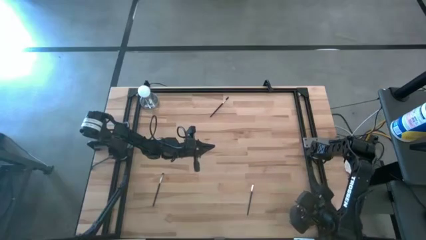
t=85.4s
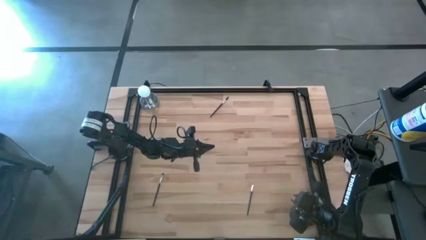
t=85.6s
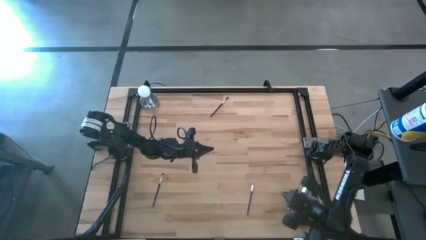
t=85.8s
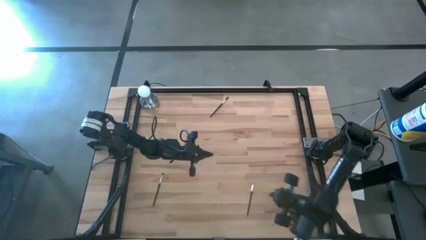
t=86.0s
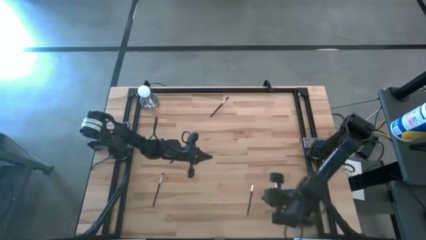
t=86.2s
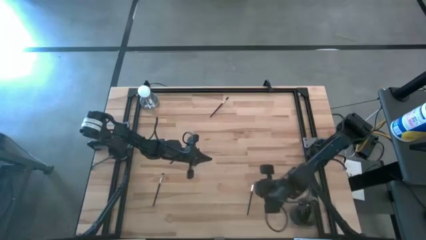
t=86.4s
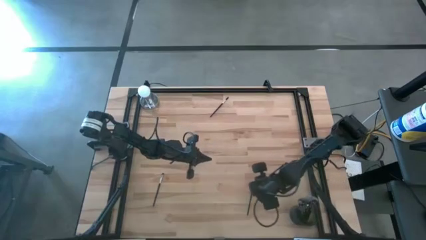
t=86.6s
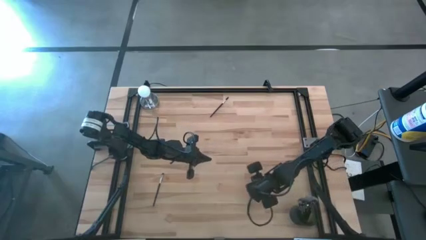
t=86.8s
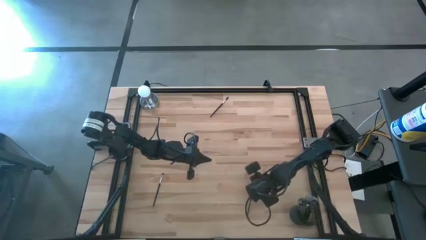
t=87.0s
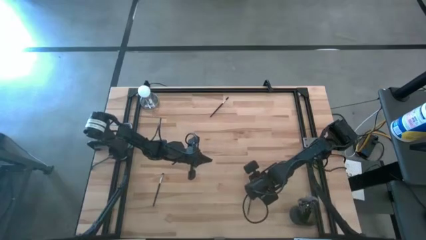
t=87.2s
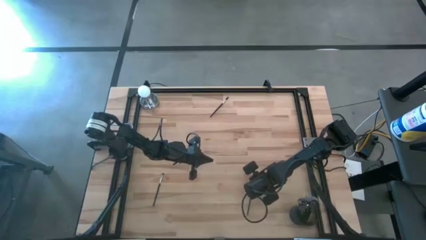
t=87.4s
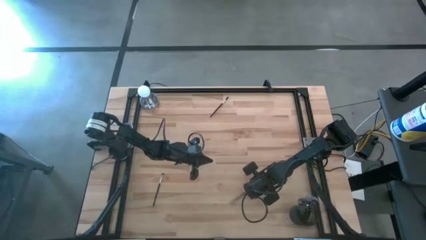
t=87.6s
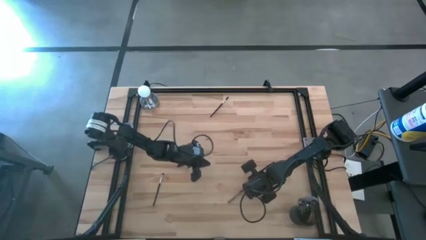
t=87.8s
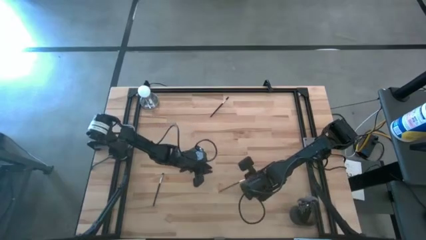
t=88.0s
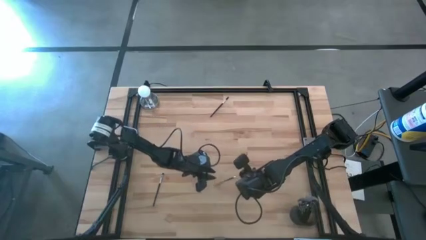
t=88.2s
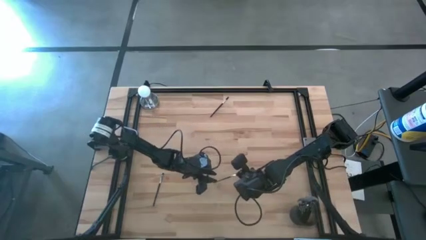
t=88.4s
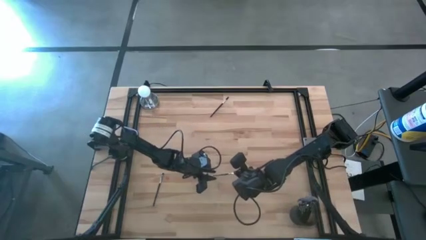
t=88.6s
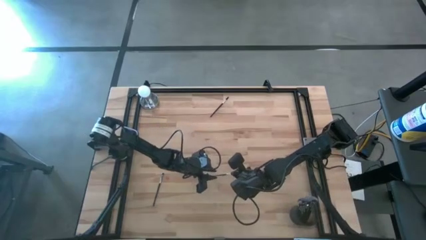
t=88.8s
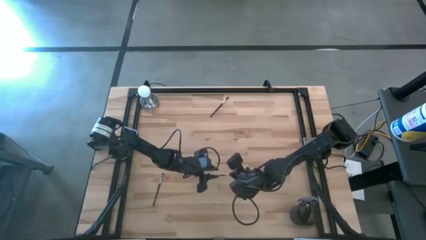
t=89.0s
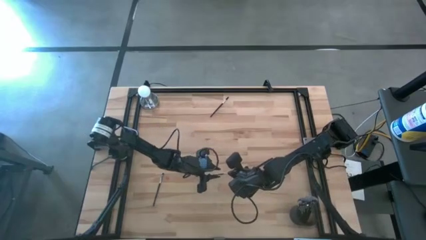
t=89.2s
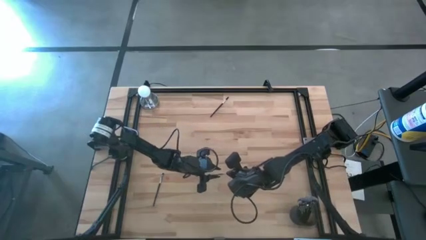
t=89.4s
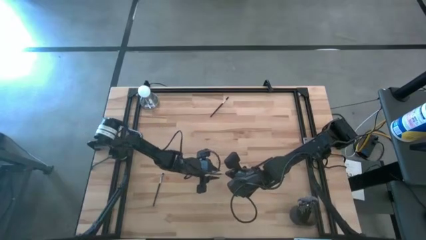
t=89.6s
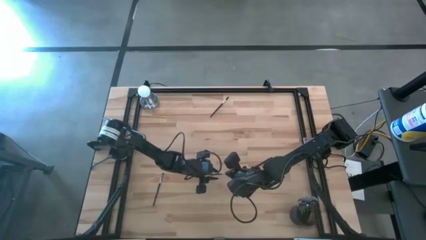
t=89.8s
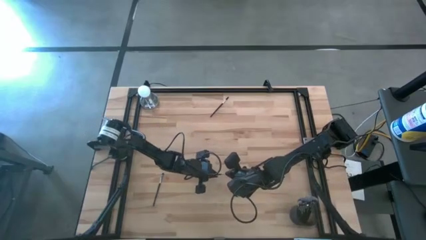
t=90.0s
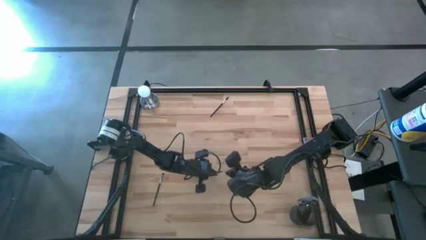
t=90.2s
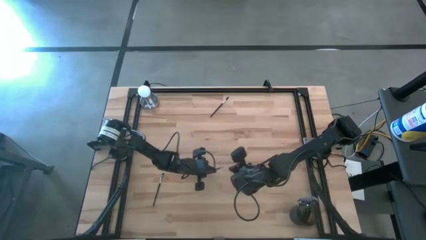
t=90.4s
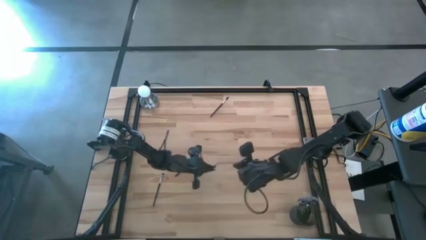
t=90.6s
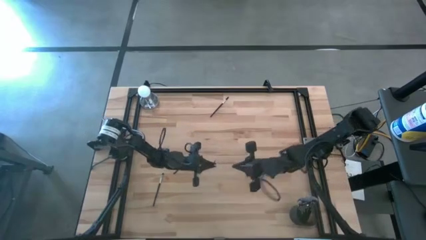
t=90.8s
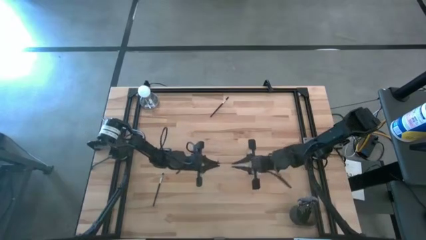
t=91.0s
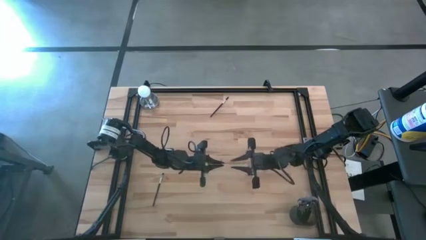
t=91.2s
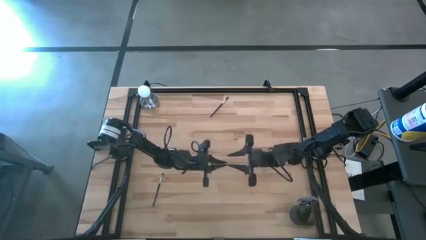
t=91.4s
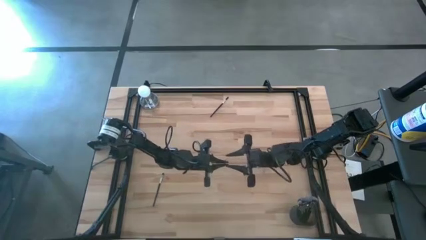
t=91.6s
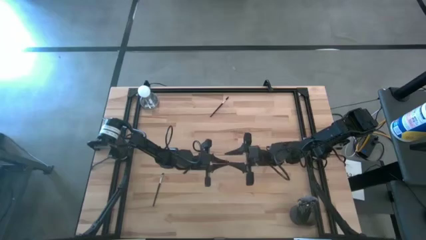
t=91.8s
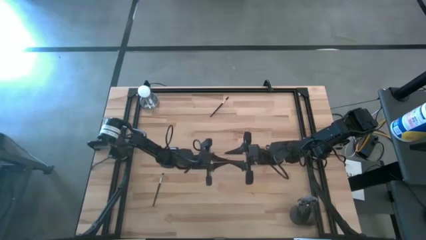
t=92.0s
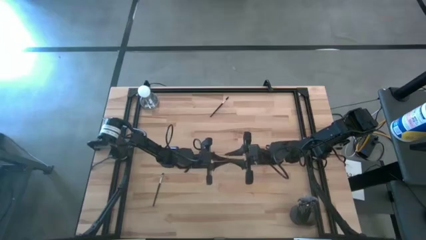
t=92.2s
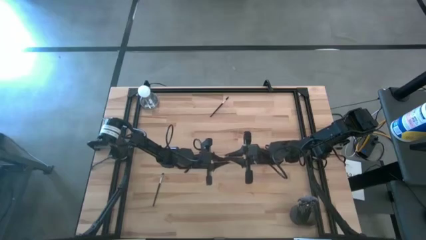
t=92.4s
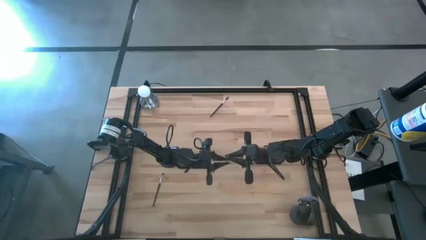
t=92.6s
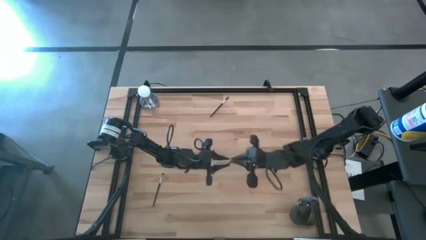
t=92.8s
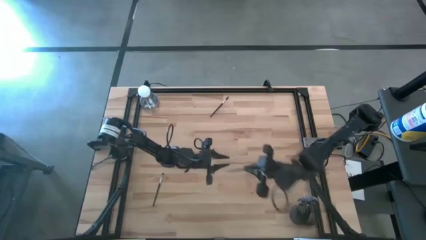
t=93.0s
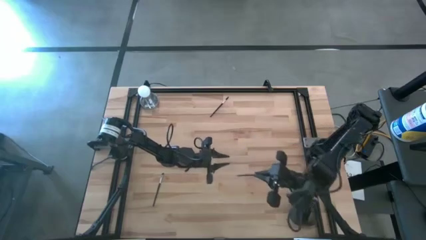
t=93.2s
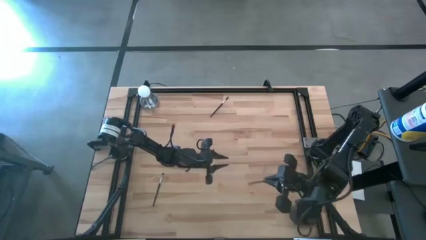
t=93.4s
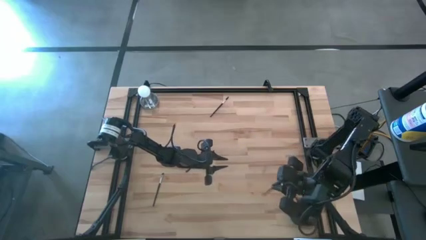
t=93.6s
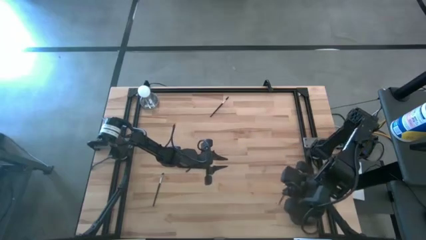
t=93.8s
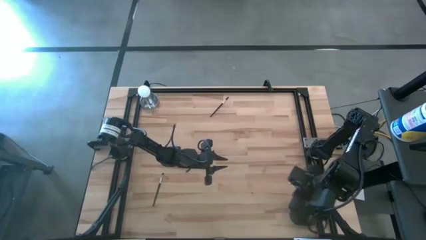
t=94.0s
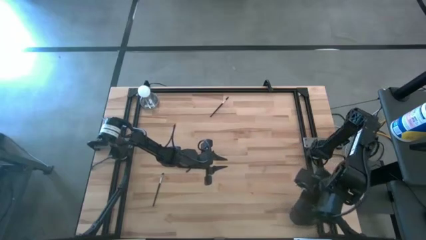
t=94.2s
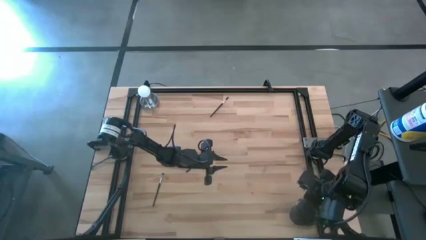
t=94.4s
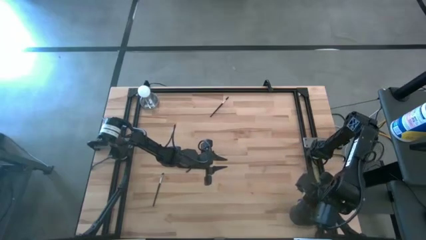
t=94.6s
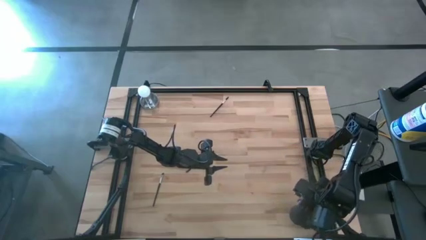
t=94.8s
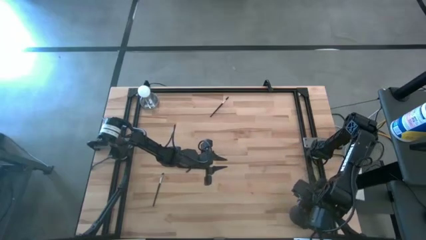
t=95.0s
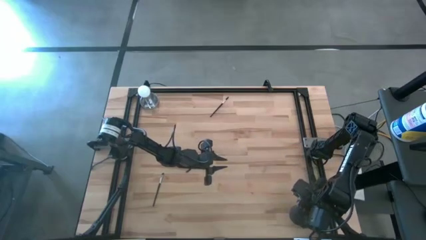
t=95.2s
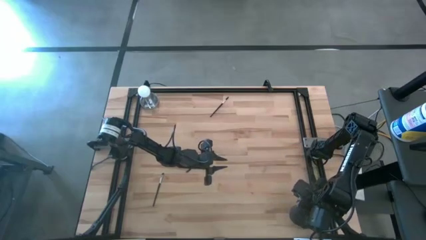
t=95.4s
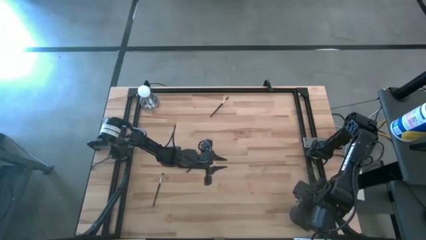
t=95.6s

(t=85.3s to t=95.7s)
Task: Pick & Place Makeup Brushes
Put the black eyeshadow brush into the makeup holder

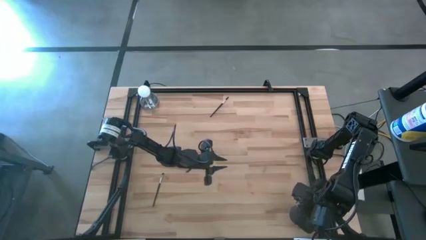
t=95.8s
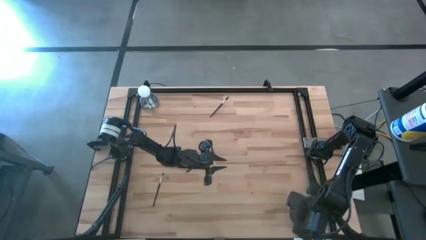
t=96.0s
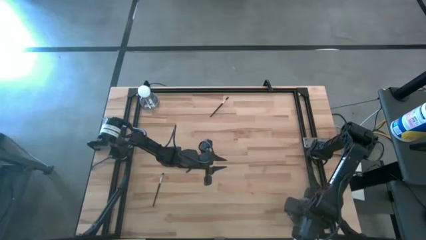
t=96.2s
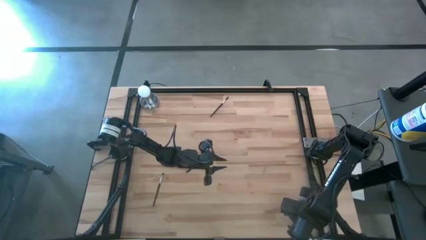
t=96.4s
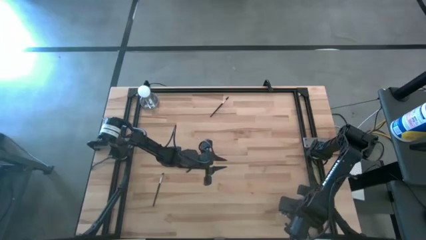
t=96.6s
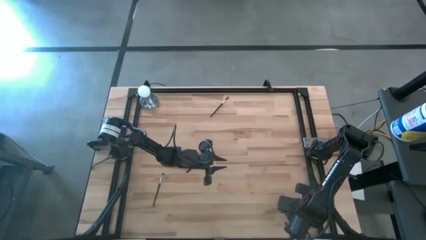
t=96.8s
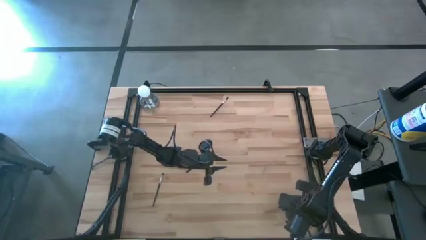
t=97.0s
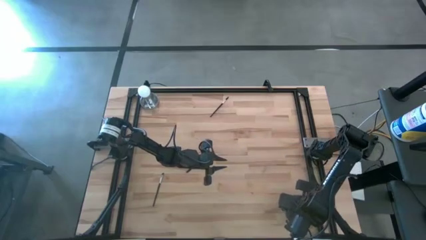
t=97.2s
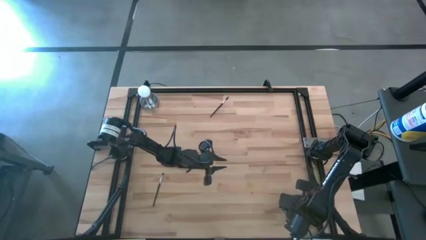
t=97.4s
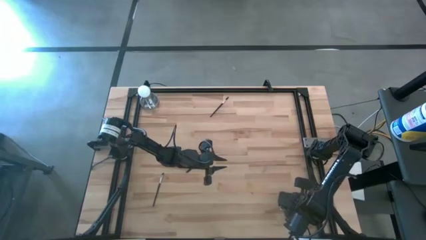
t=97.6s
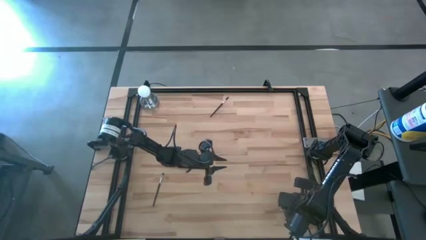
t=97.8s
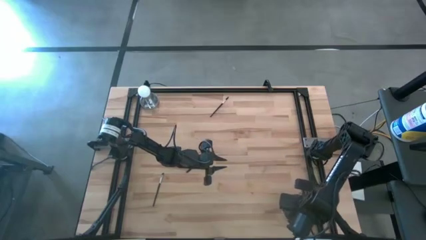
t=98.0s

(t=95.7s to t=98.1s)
Adjust the makeup holder
